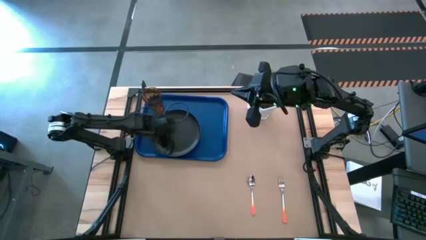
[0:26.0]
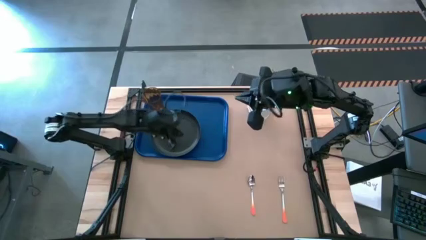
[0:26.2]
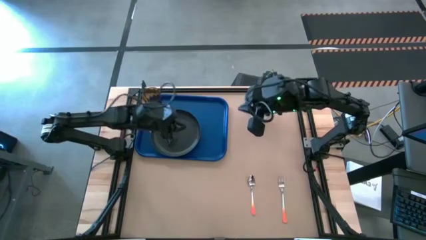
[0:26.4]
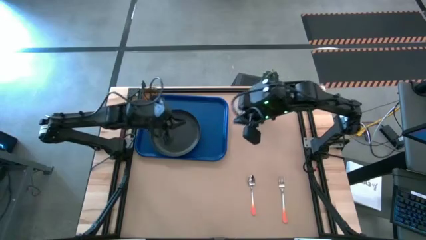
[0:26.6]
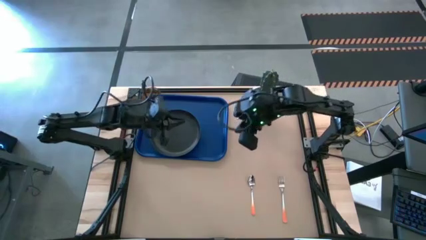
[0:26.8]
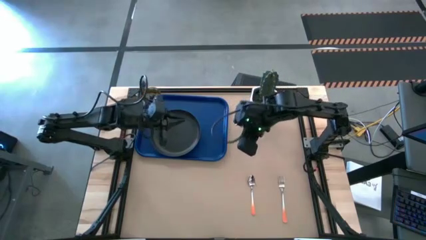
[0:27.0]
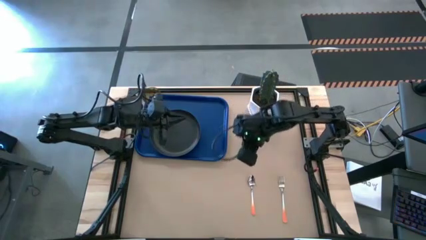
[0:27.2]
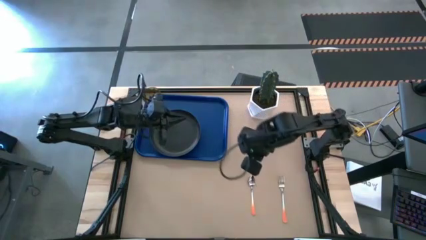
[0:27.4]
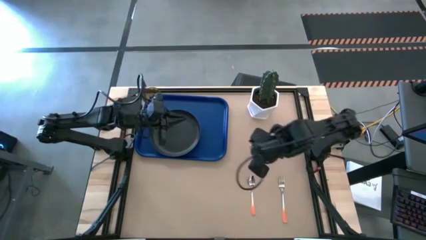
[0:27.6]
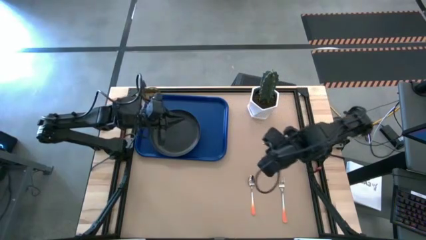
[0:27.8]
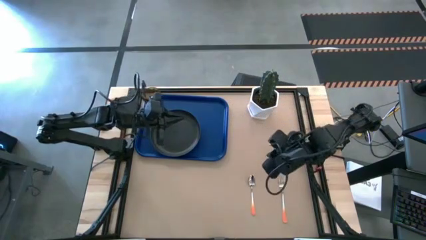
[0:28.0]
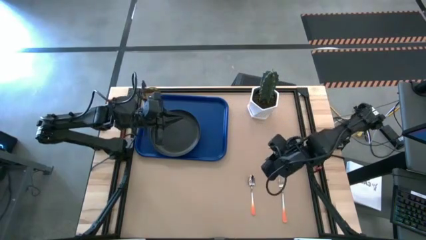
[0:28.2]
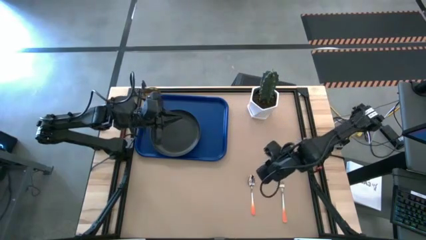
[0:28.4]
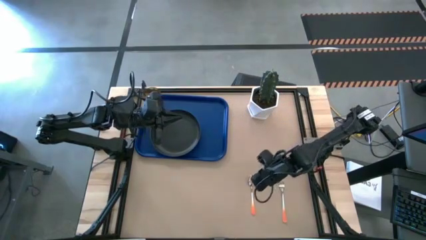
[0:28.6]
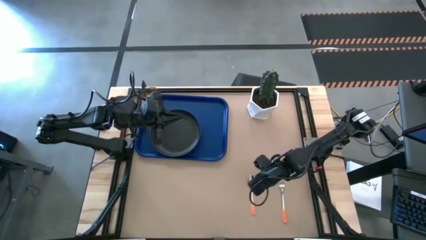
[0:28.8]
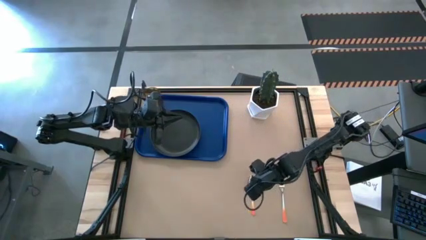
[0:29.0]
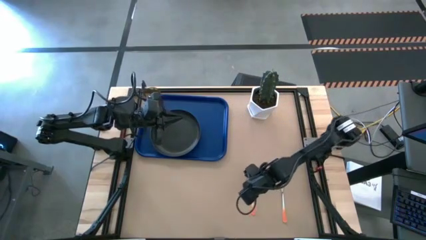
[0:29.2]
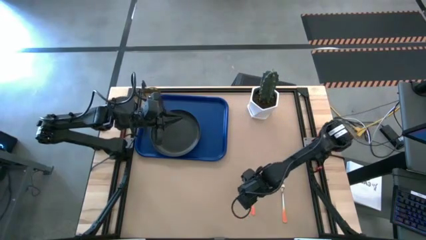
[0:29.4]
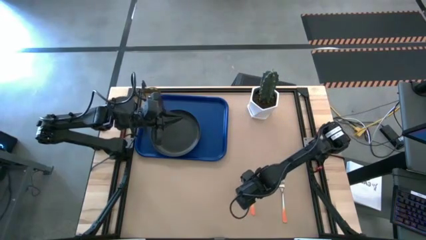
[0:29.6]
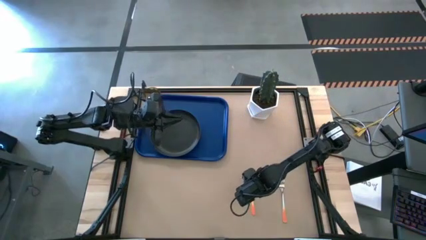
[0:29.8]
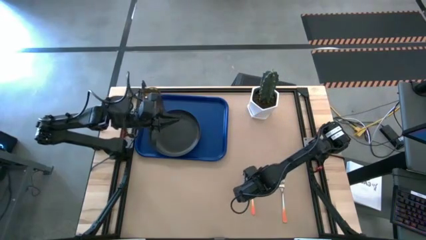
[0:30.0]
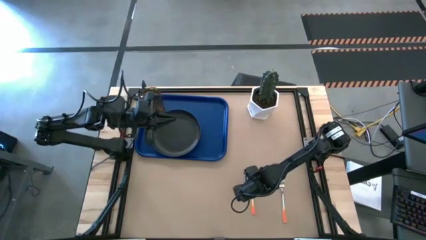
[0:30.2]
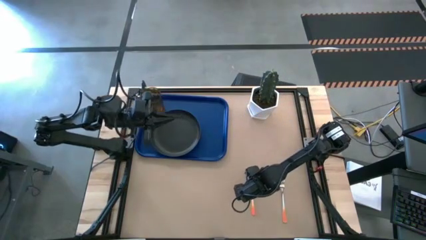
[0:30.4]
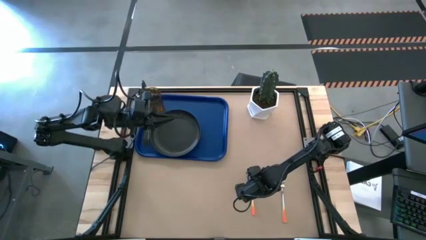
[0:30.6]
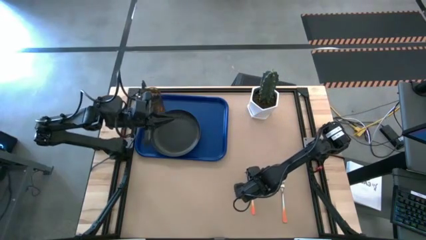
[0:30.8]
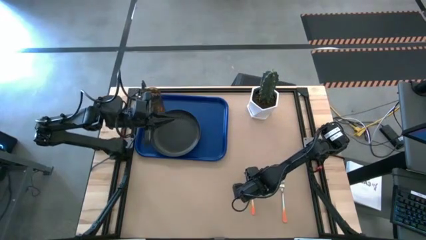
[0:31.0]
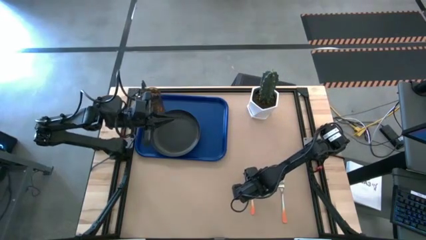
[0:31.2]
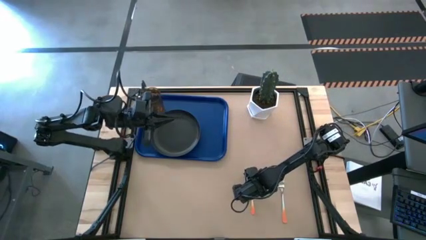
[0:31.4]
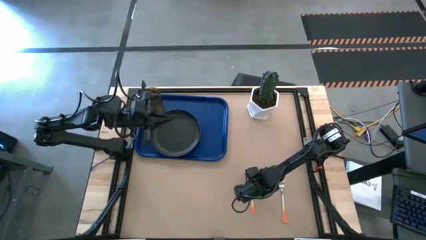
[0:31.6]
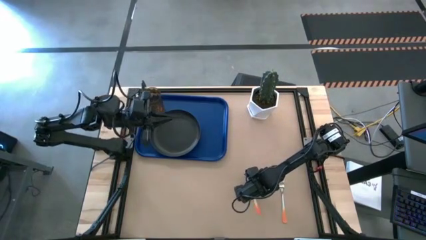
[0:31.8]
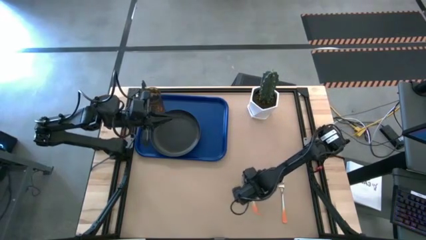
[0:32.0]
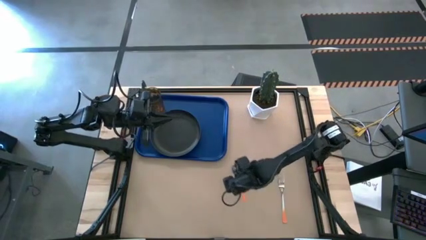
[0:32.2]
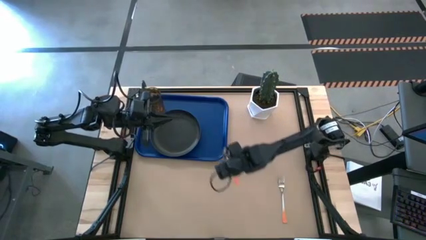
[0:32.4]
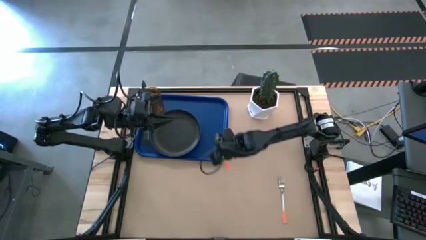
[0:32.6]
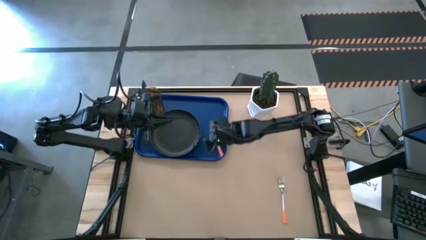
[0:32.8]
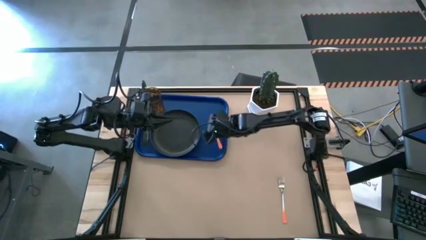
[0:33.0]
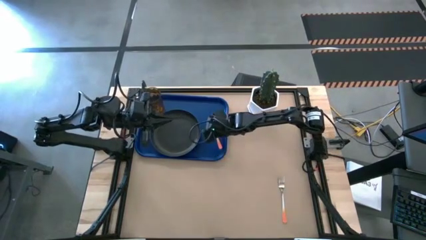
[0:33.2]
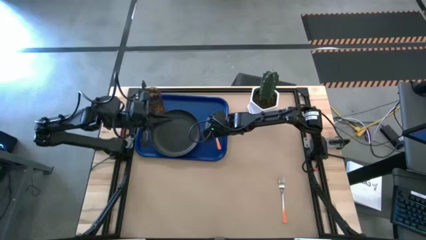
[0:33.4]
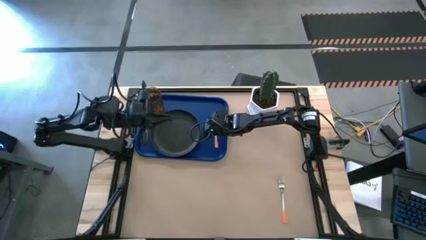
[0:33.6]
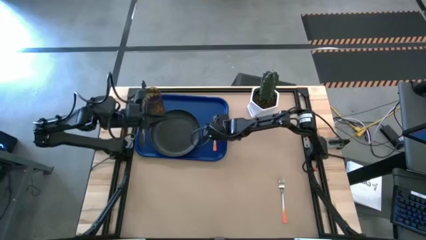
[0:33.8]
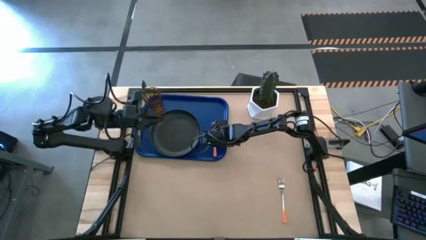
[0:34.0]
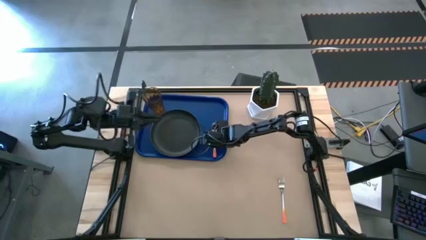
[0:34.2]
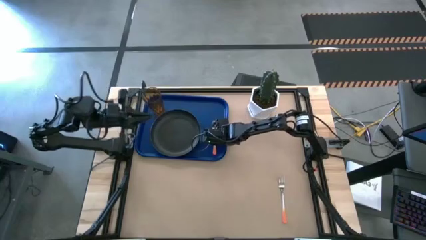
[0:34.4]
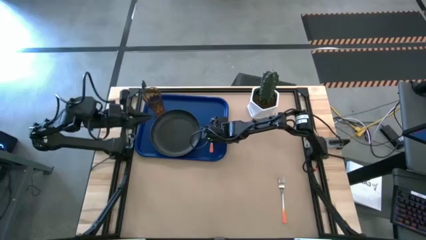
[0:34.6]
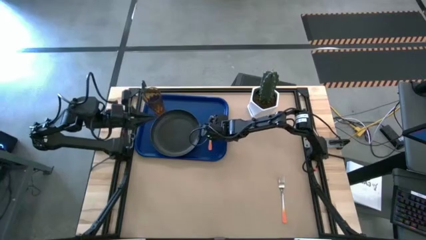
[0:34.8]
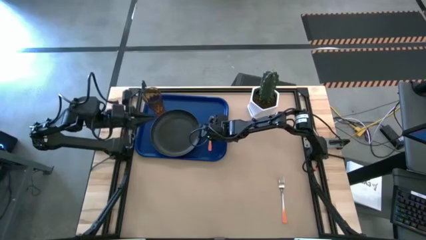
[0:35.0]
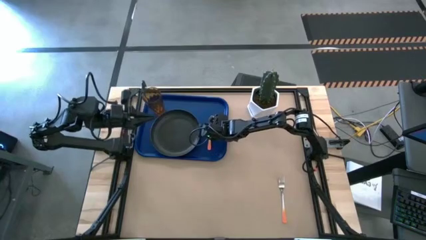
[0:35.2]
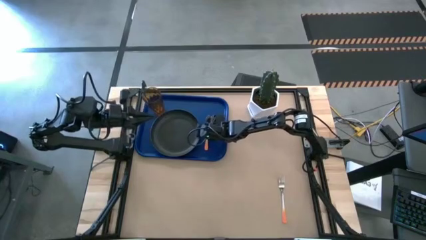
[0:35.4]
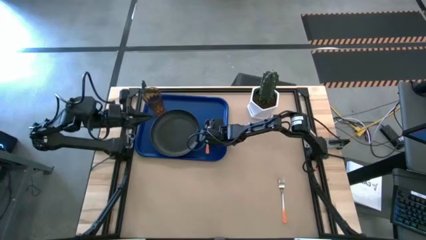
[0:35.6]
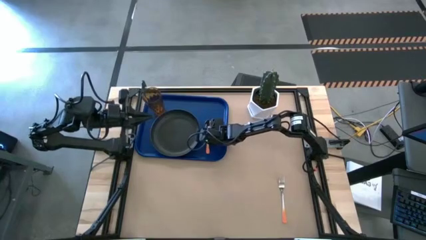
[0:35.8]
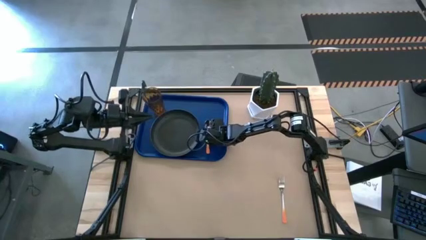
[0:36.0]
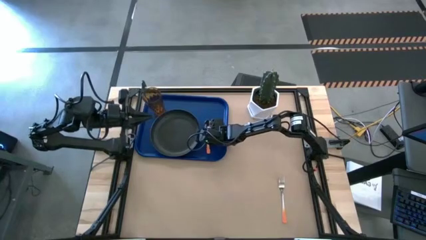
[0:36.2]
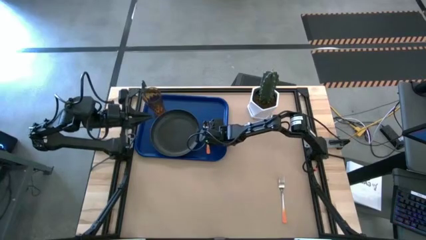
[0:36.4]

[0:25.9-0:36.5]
Task: Pick and place plate/cup/fork/spoon on tray
Put the orange spoon on the blue serving tray to the right of the black plate

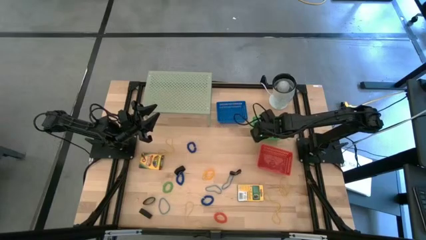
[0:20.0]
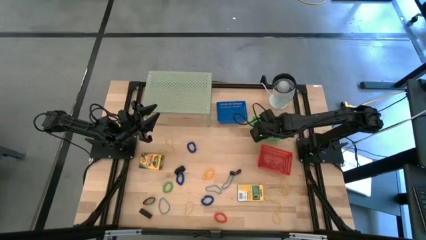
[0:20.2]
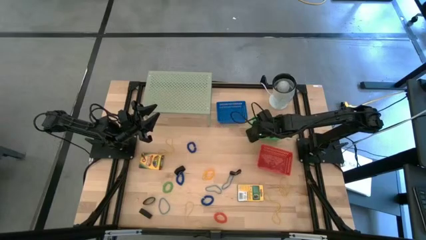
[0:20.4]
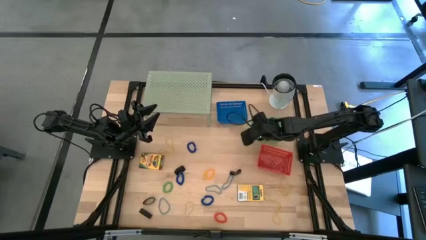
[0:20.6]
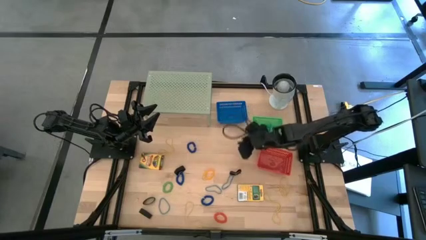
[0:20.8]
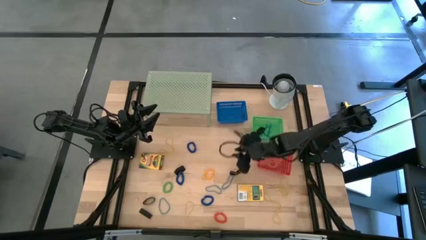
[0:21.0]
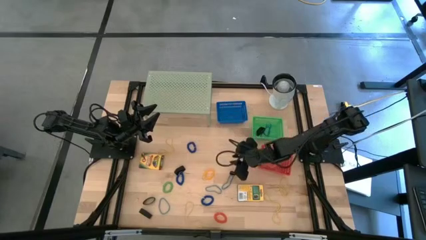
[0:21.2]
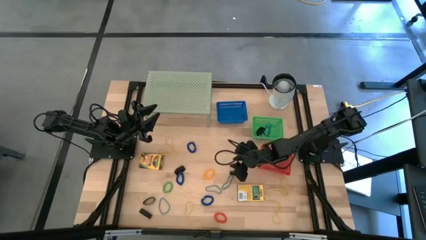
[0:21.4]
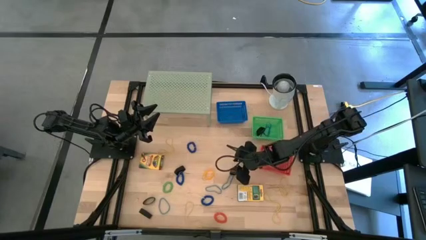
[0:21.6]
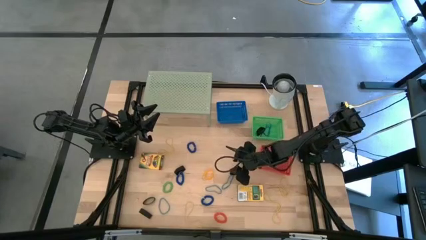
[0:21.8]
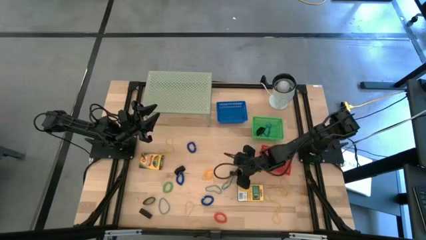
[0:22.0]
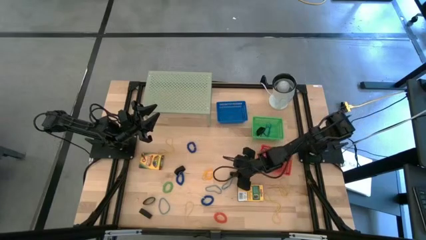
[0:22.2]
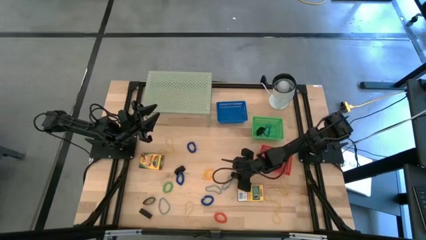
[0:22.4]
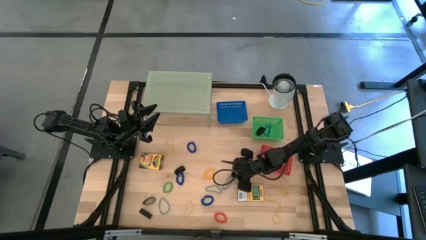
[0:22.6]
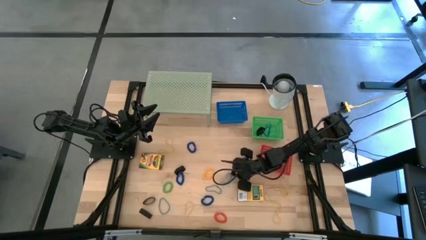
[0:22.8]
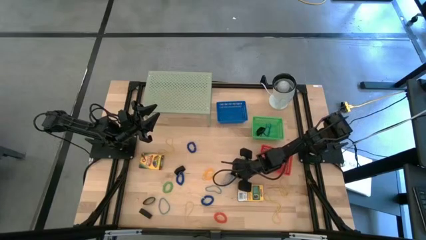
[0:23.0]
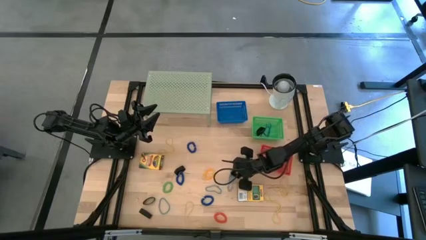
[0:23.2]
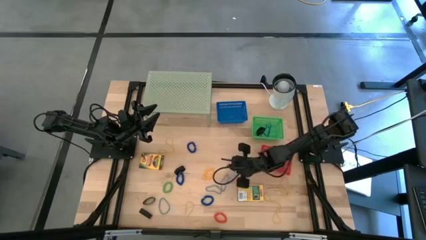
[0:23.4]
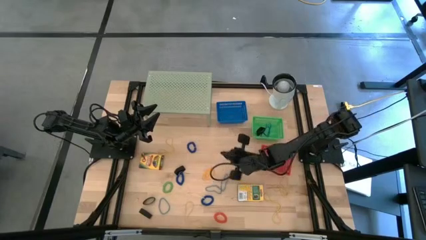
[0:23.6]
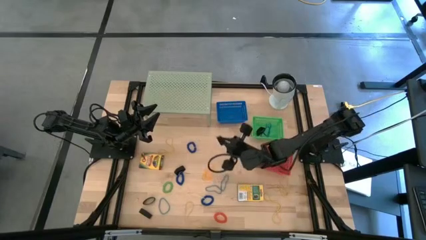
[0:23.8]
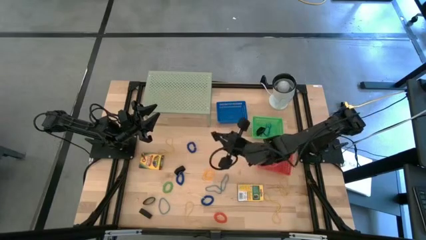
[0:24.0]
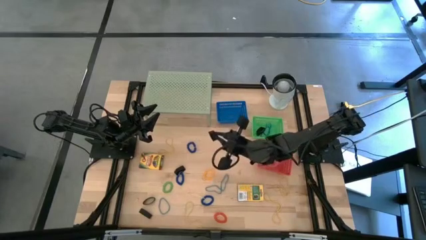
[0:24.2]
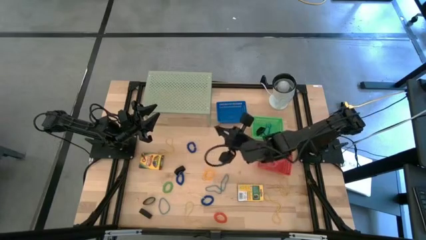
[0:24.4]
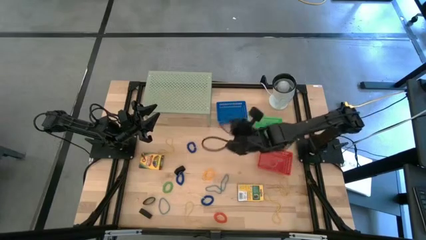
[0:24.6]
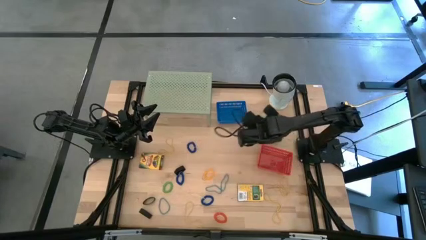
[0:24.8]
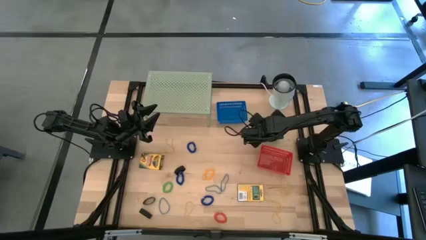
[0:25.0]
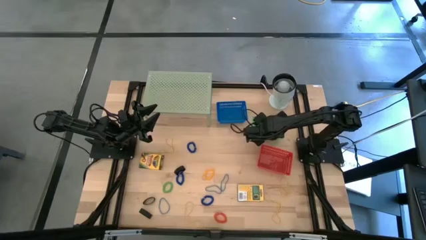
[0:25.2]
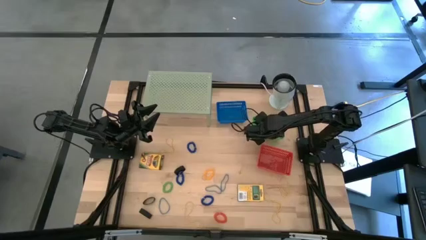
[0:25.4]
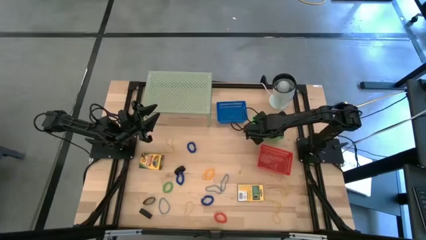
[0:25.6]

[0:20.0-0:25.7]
Task: Pick & Place Office Desk Supplies
Put the black rubber band into the green bin

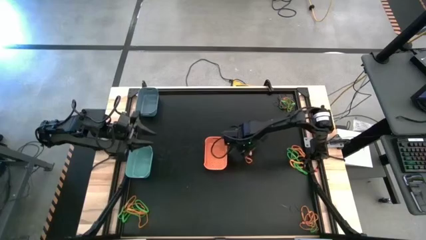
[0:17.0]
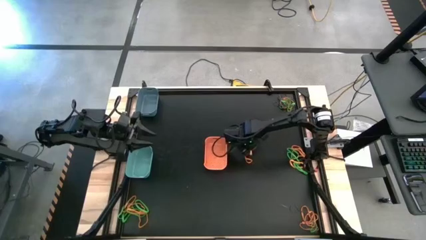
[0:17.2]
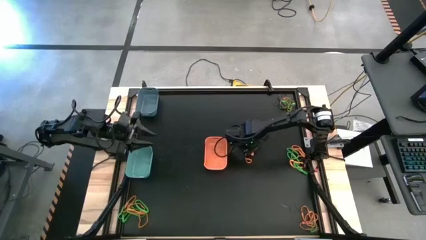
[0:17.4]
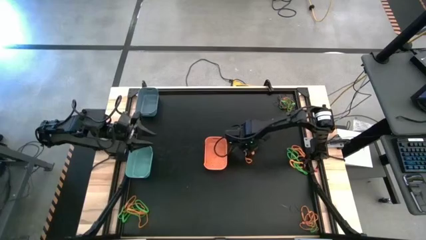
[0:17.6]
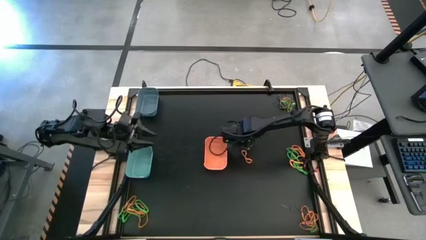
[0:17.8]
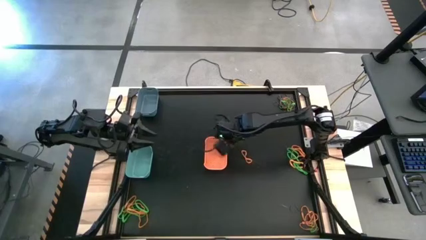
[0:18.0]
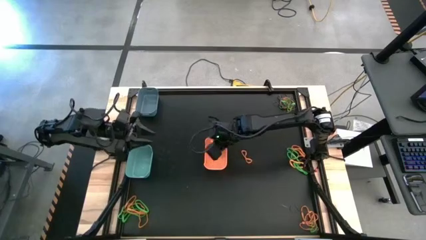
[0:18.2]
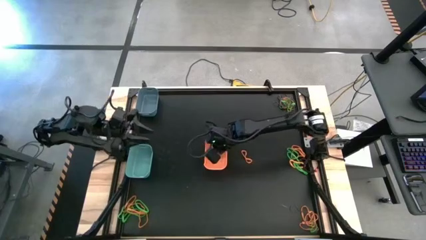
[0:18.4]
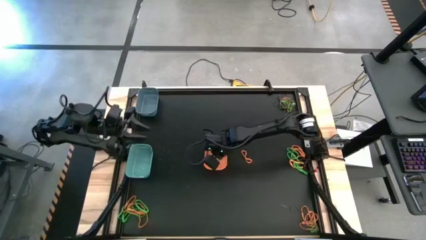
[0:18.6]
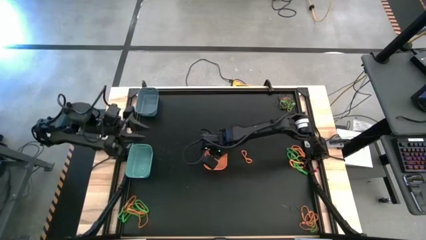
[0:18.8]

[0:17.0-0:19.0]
Task: Sort rubber bands into baskets
Put the orange rubber band into the orange bin
